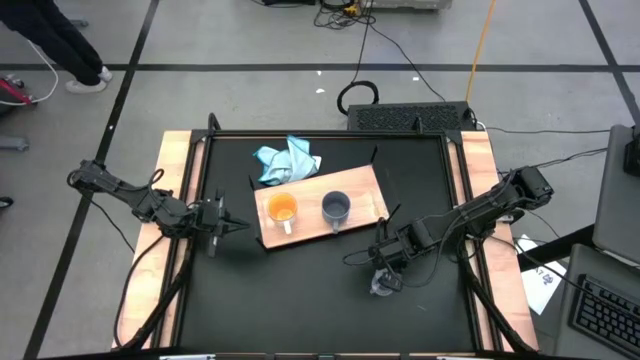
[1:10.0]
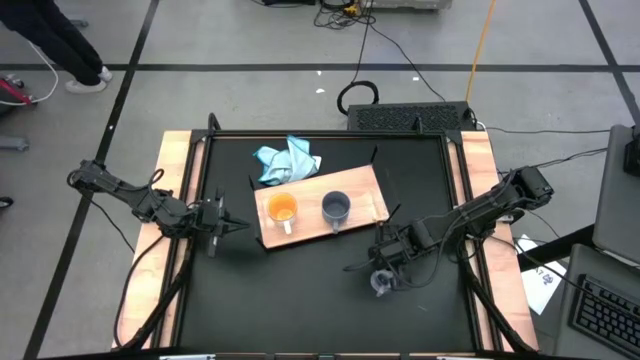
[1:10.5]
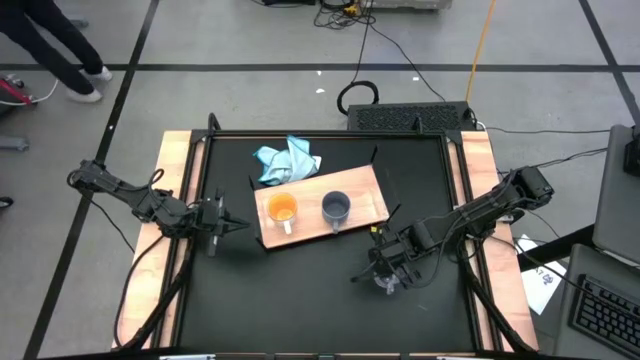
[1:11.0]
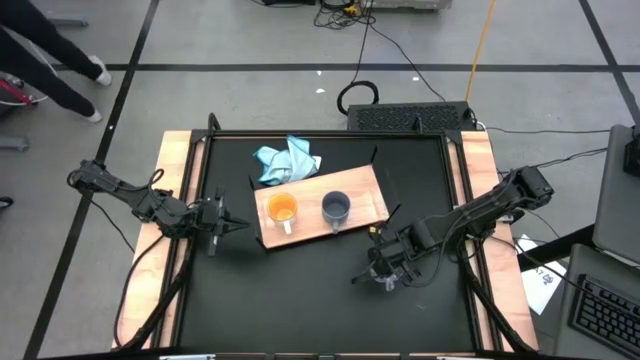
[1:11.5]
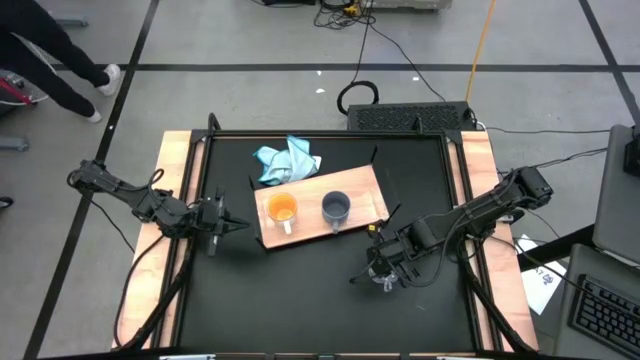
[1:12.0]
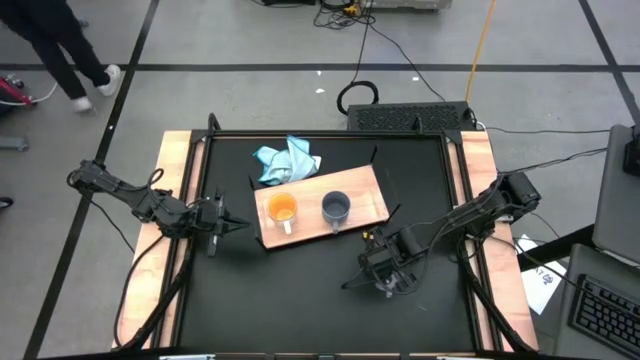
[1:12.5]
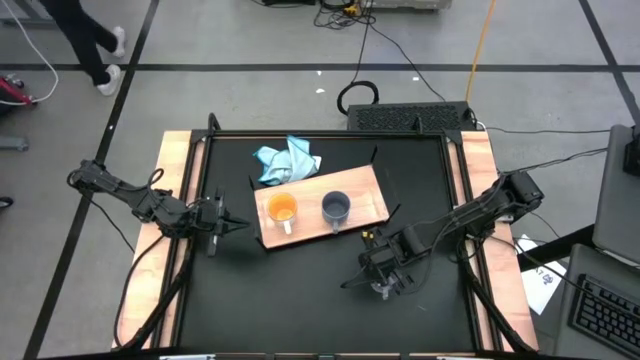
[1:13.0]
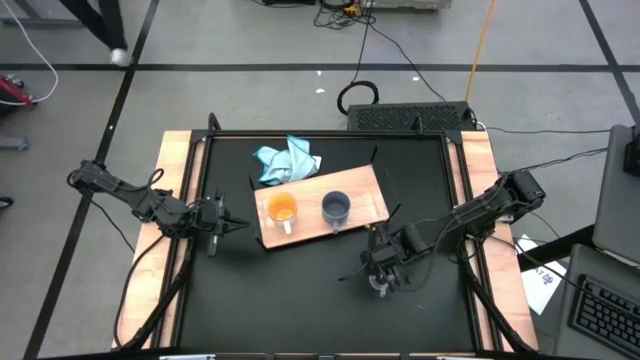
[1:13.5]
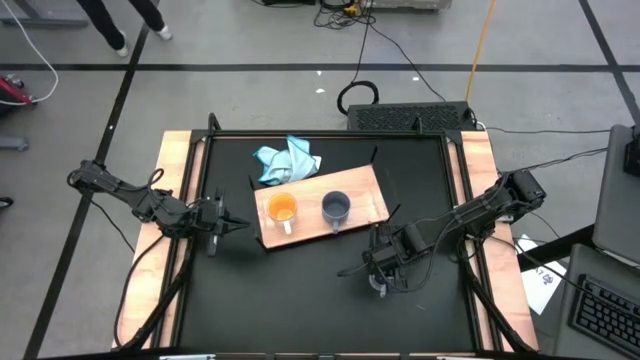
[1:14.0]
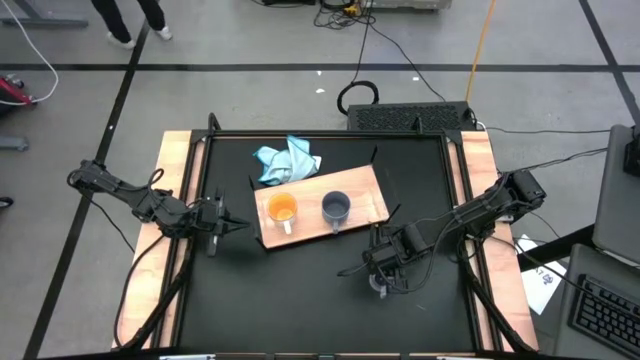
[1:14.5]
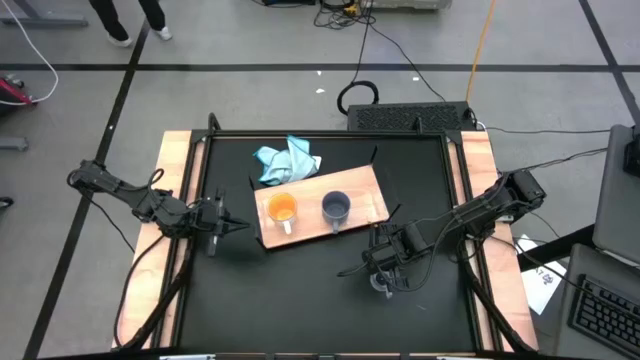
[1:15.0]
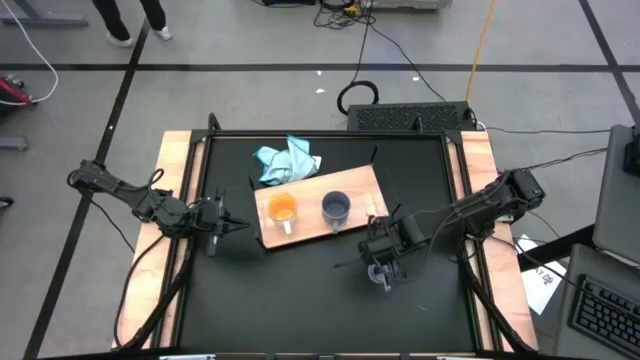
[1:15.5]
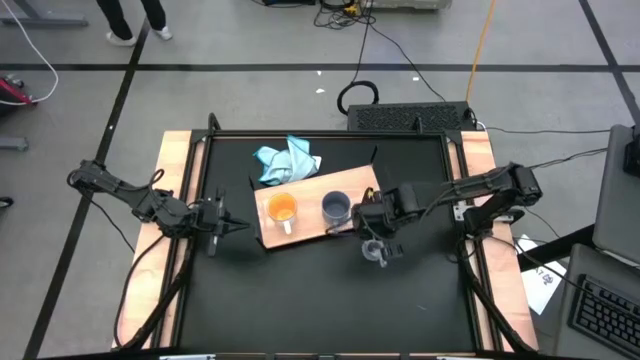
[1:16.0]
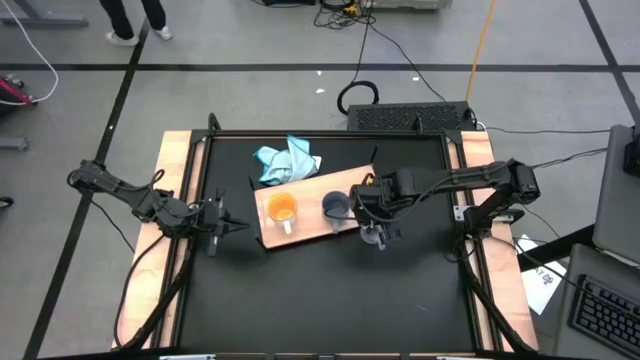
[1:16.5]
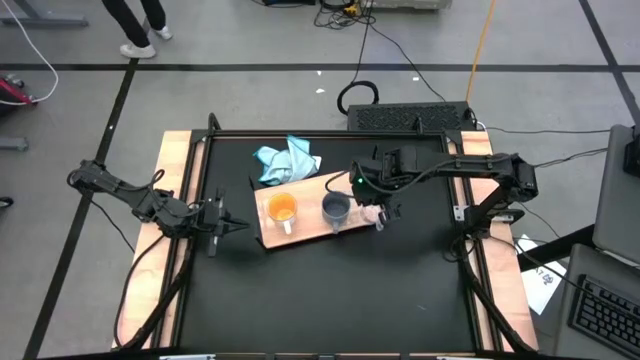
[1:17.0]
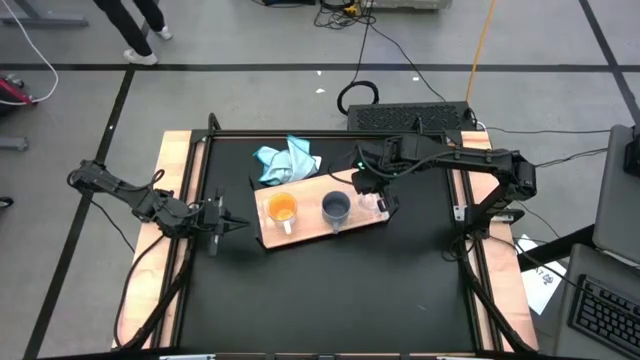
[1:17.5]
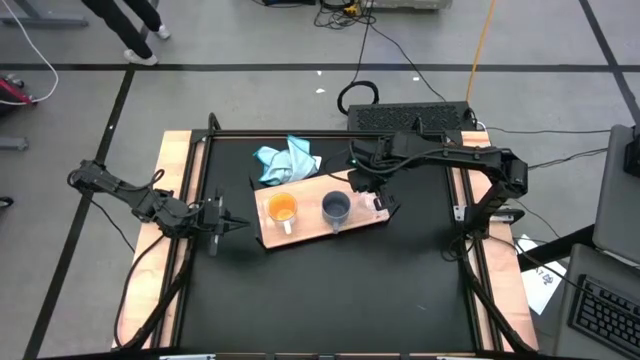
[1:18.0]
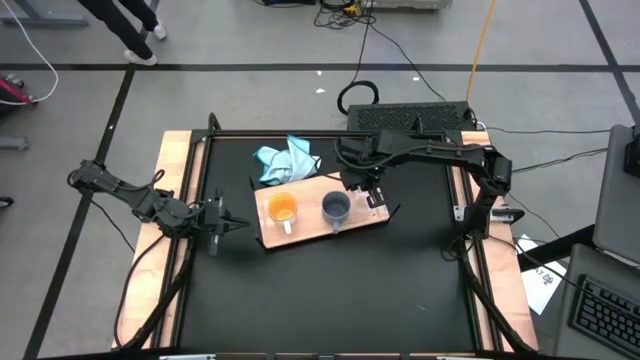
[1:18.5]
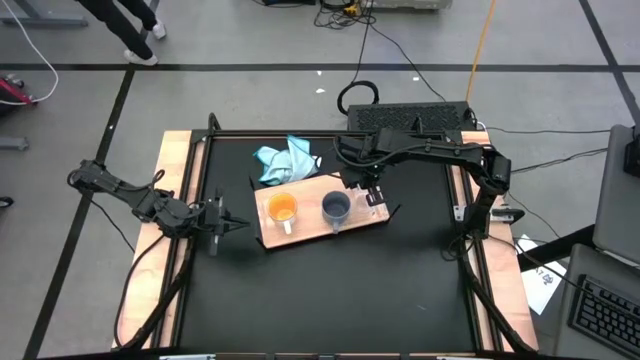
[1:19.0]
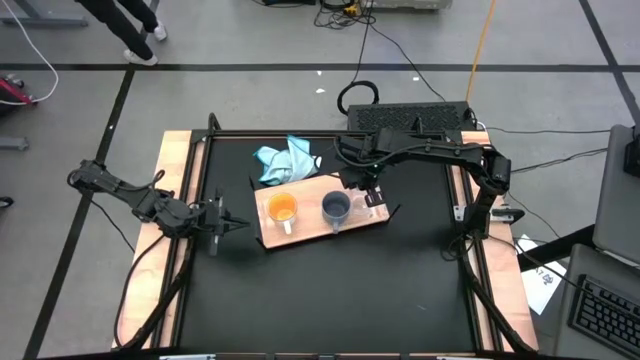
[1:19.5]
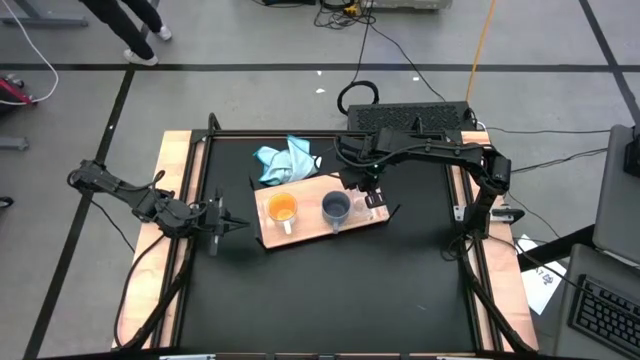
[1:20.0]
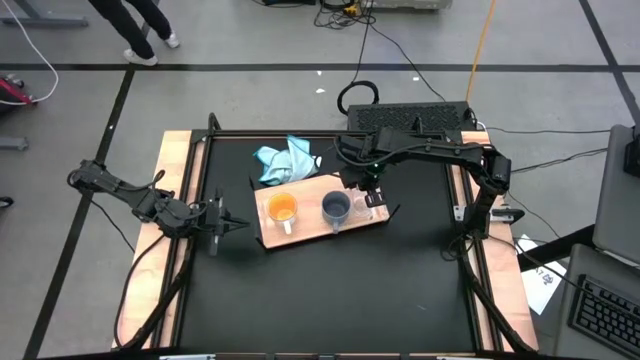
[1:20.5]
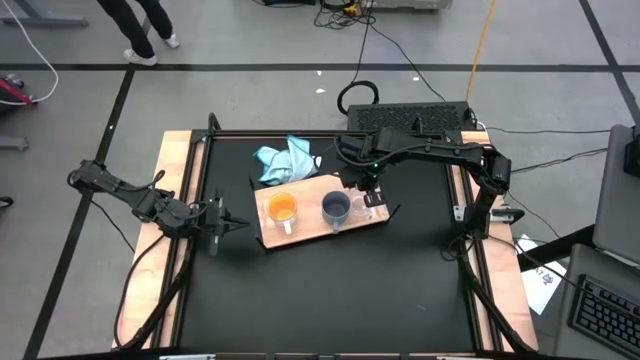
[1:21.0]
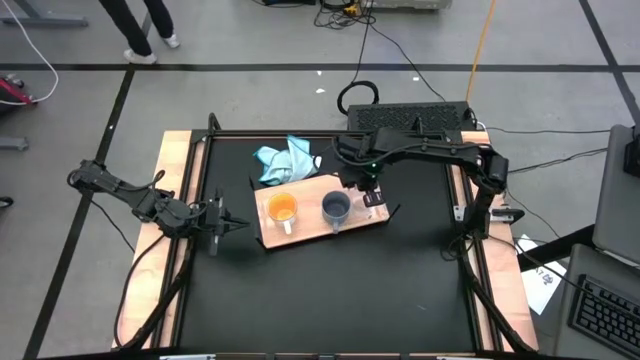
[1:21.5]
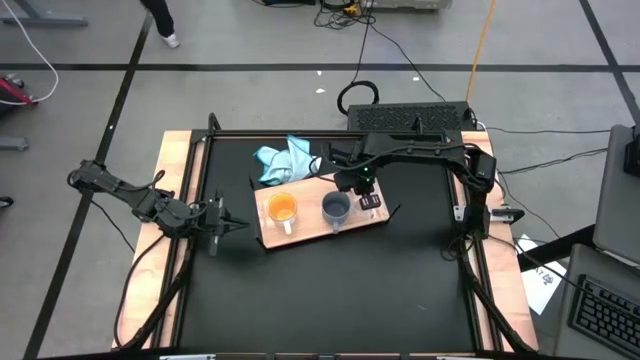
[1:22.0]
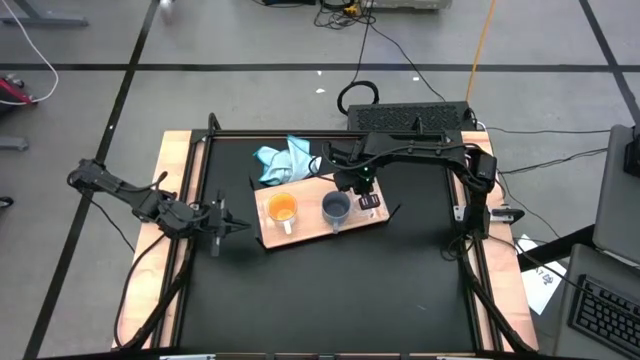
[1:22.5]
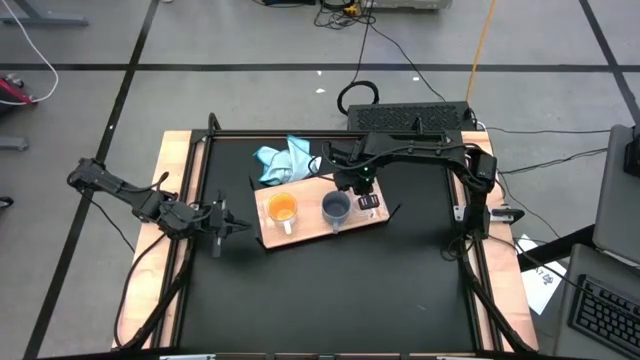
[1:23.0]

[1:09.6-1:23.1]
Task: Stack small to large cups/mugs on shelf
Put the transparent mug on the shelf

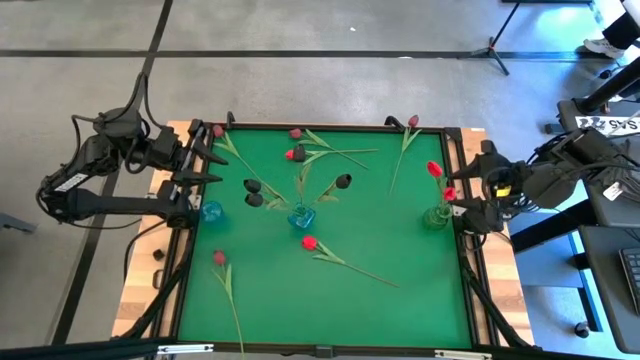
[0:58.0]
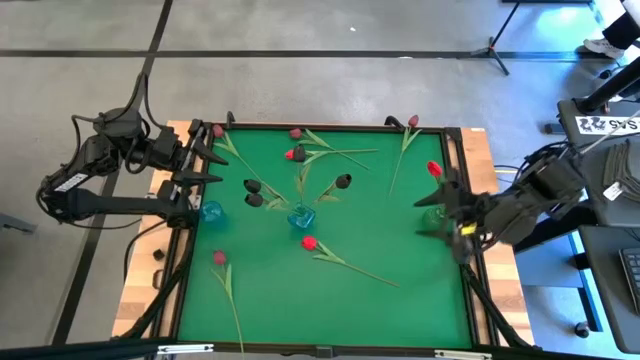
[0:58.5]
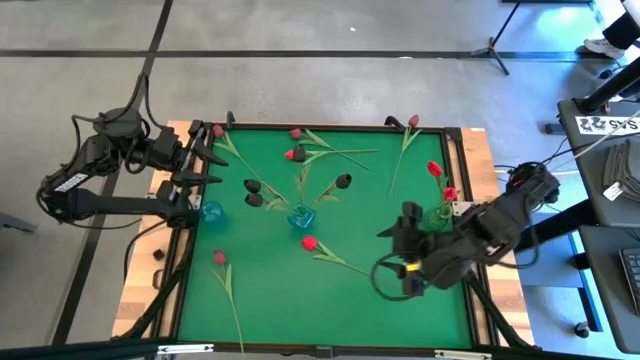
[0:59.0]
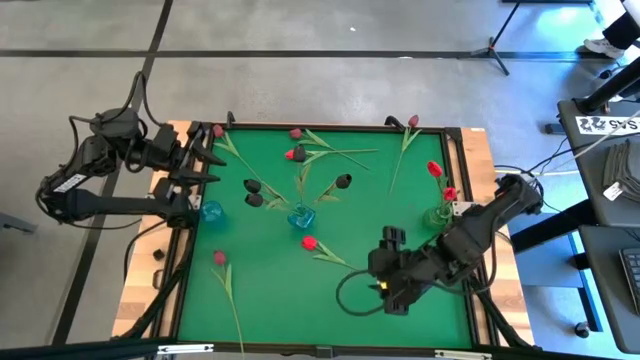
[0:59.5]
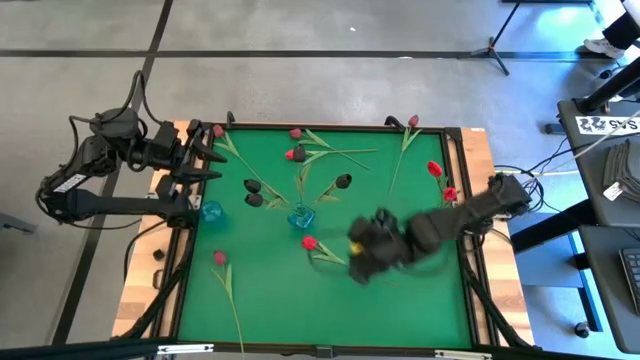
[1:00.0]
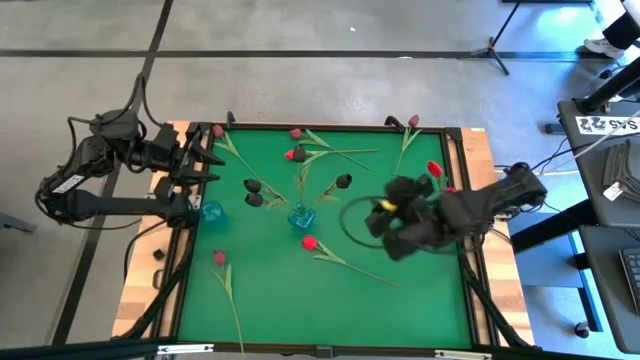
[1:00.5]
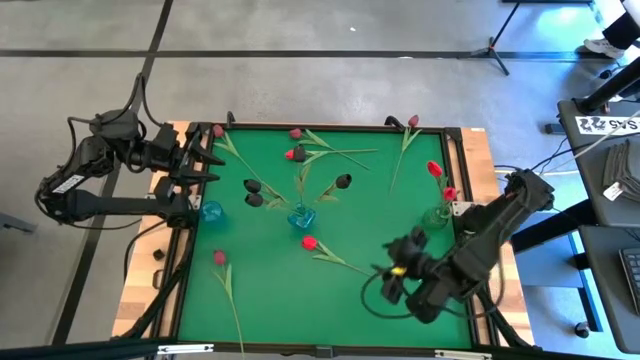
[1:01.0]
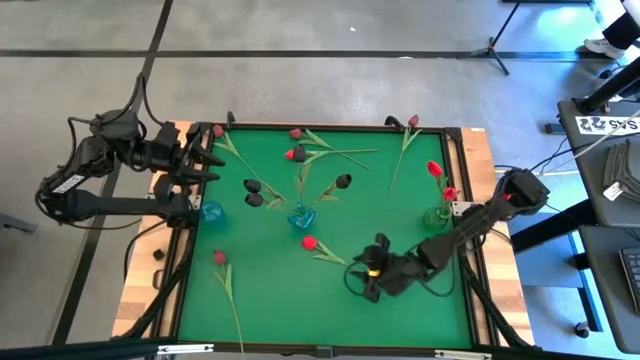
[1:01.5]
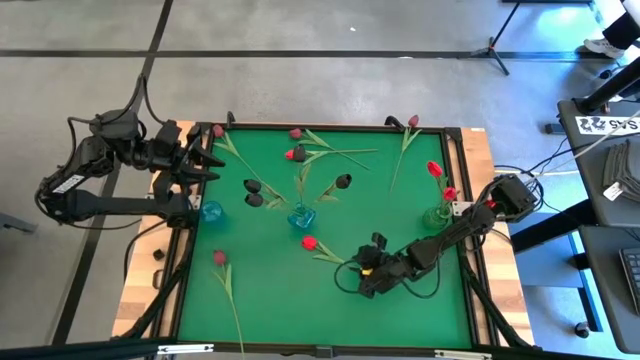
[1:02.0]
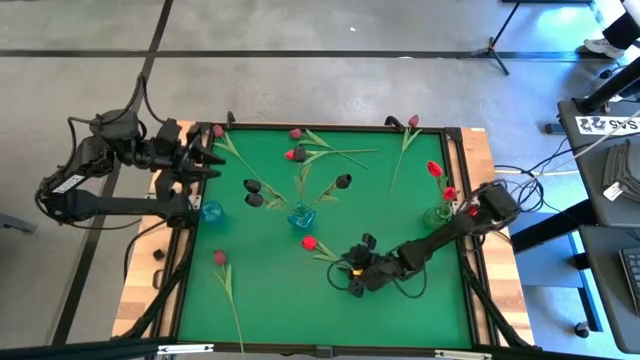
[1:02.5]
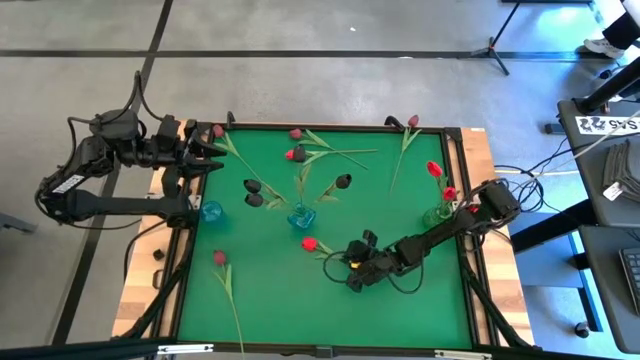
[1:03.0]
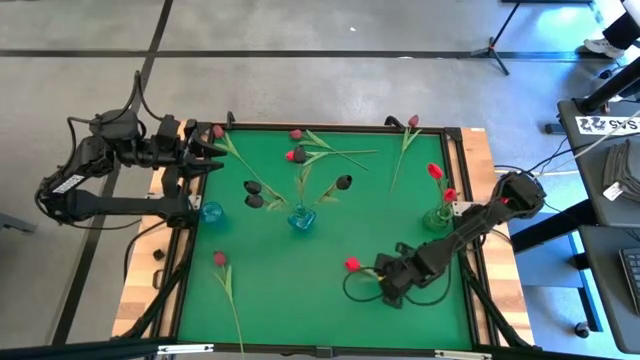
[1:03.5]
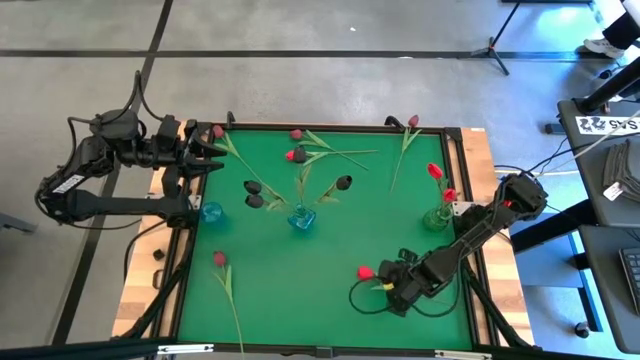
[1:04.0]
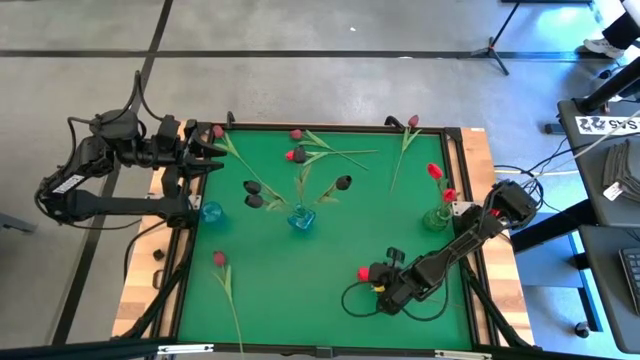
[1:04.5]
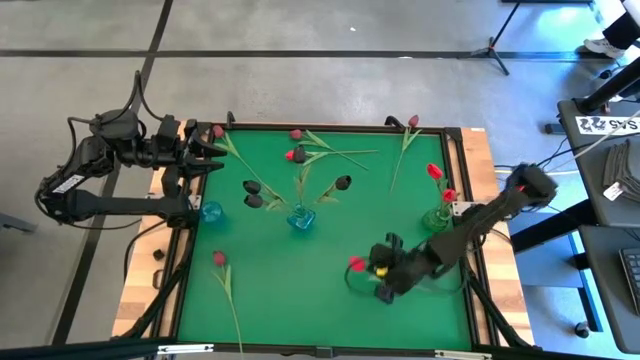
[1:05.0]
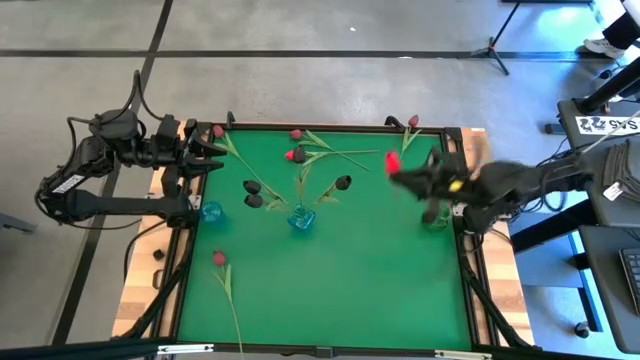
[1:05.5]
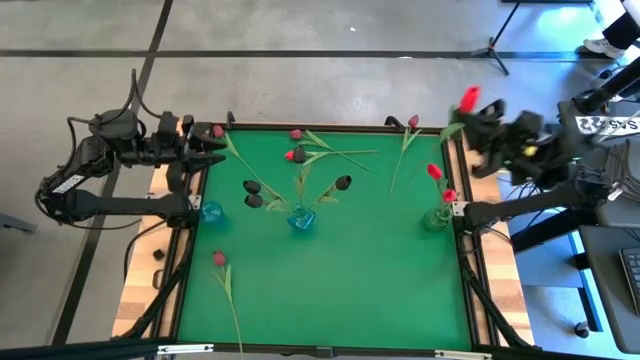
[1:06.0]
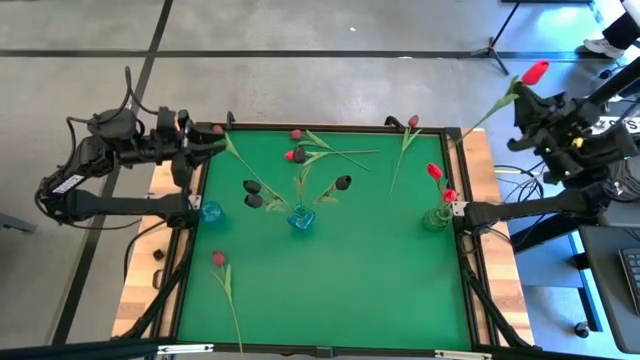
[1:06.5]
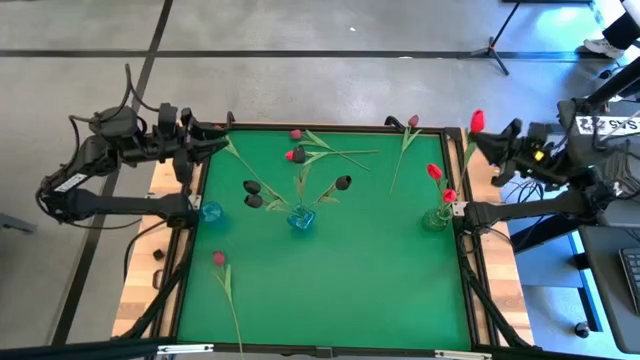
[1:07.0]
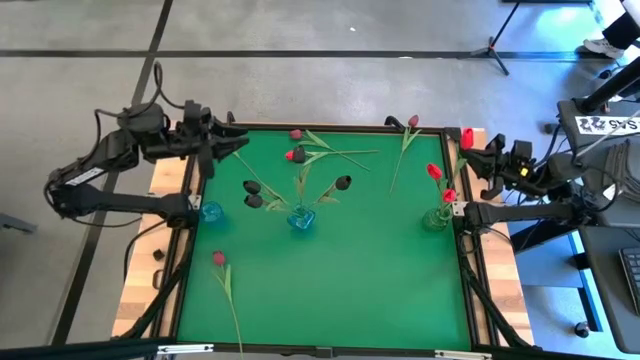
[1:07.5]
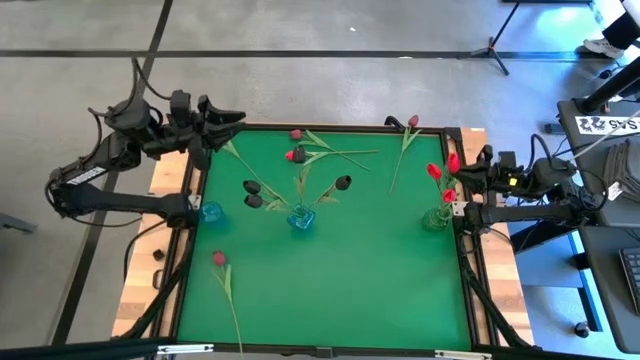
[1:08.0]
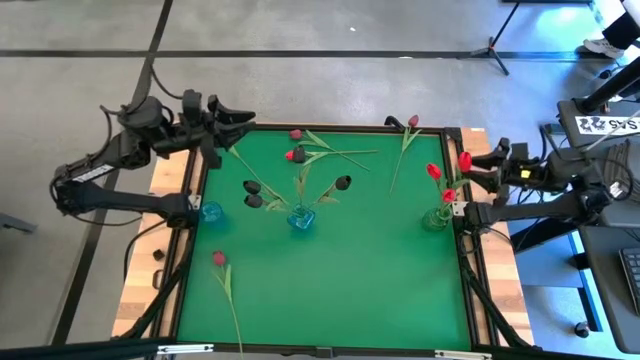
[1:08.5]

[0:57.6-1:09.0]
Task: Sort flowers into vase by color
Put the bottom red tulip into the green vase
